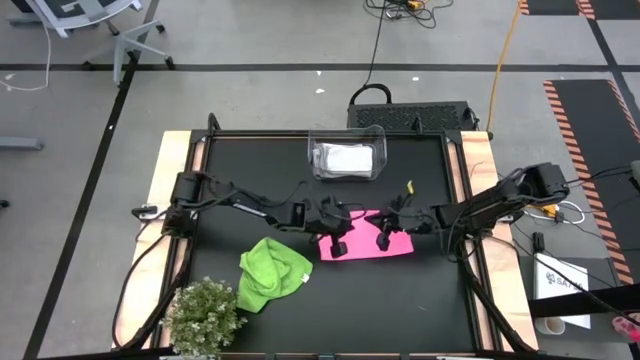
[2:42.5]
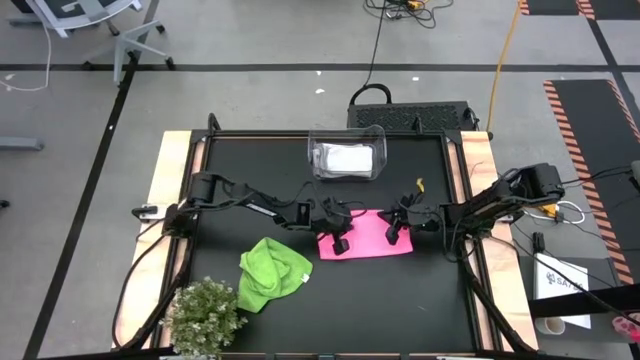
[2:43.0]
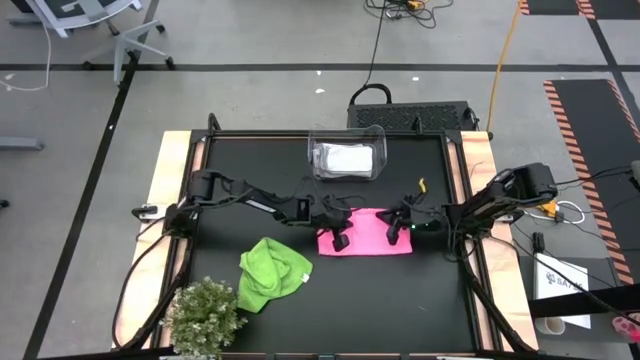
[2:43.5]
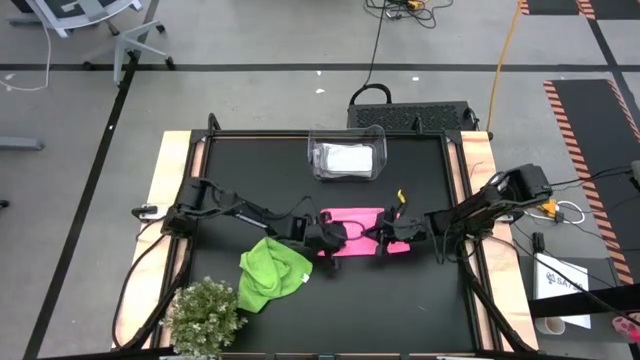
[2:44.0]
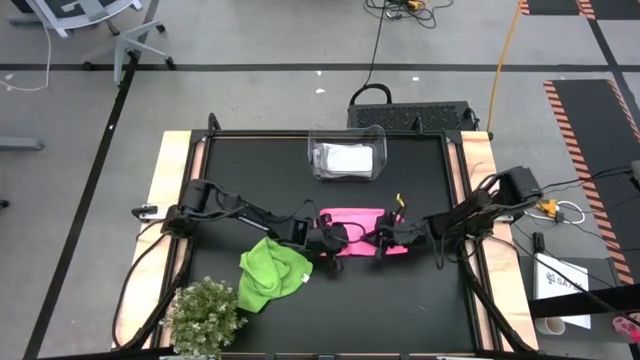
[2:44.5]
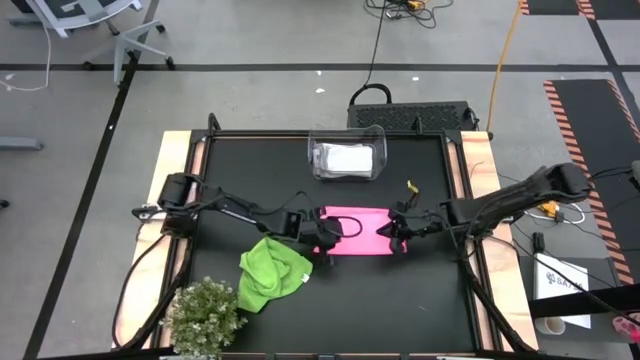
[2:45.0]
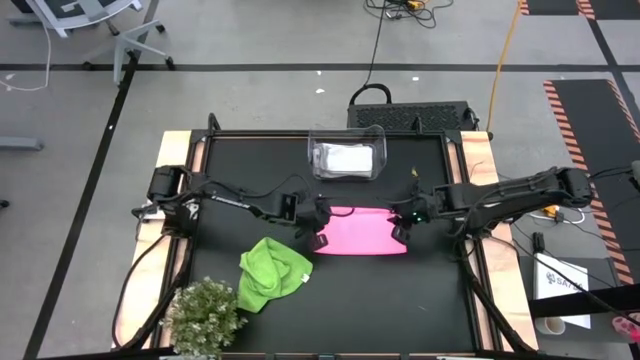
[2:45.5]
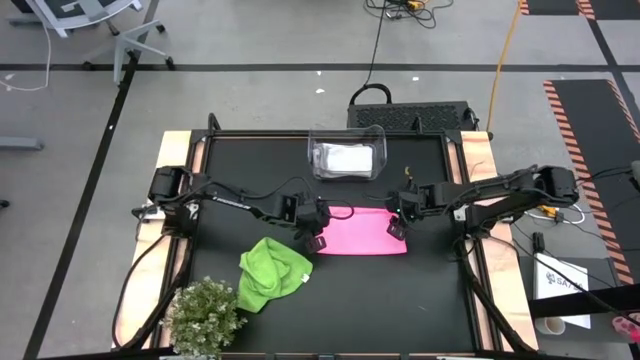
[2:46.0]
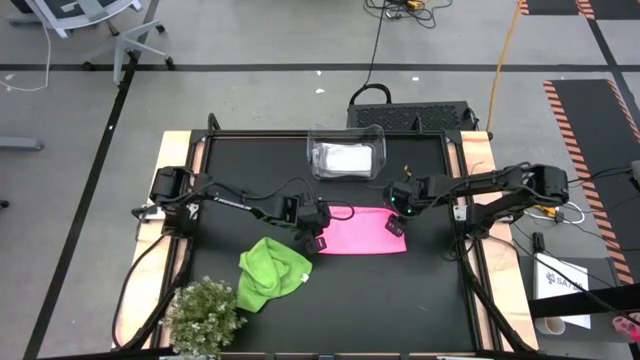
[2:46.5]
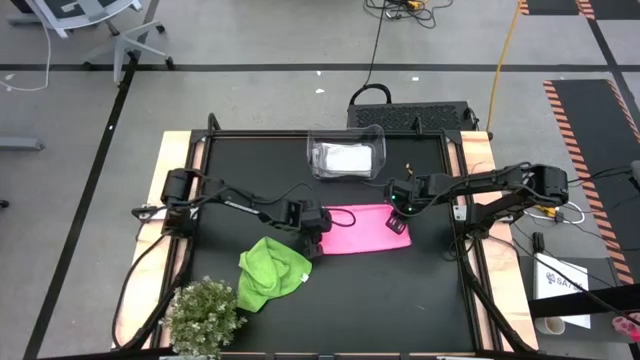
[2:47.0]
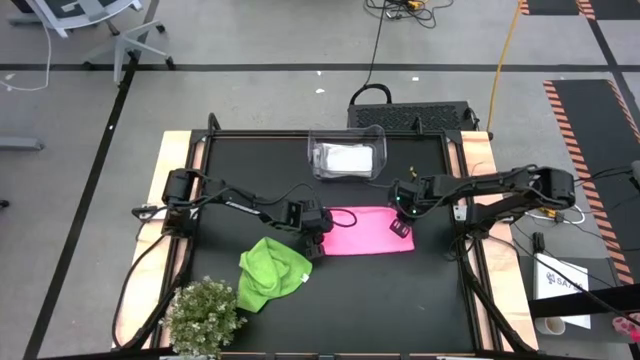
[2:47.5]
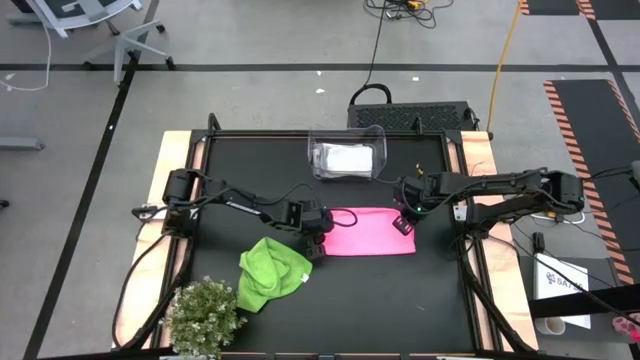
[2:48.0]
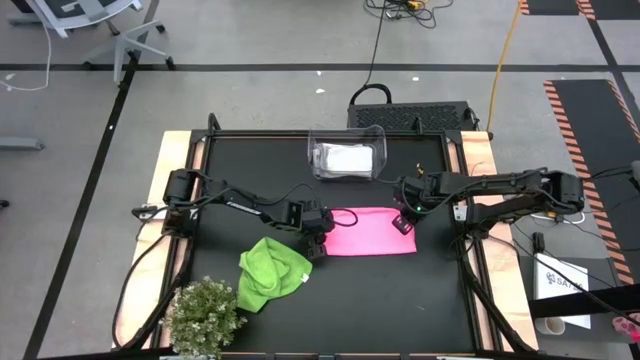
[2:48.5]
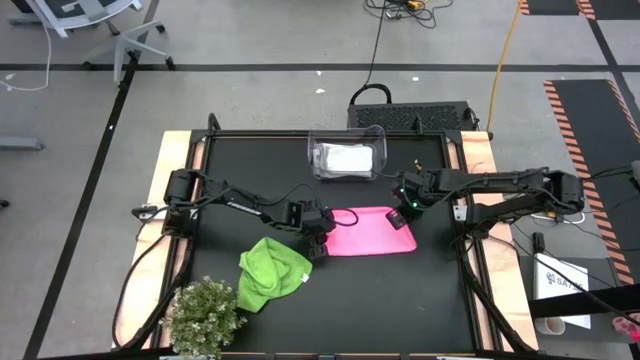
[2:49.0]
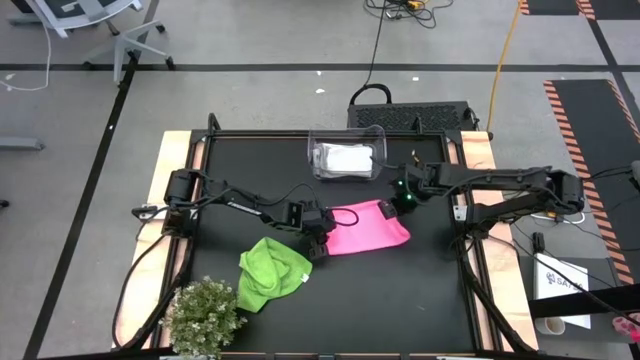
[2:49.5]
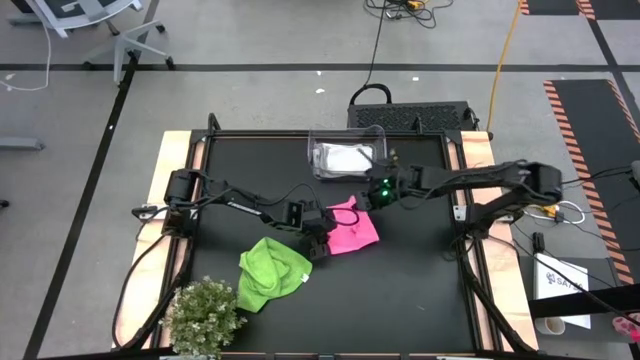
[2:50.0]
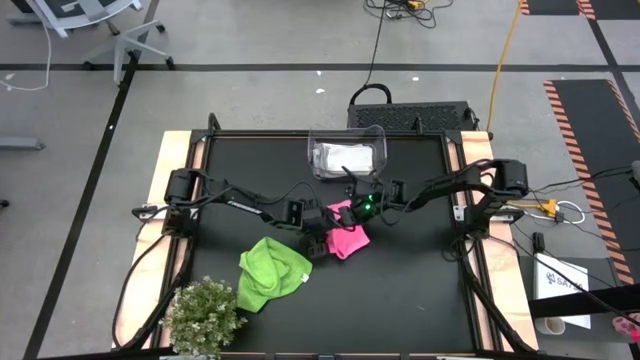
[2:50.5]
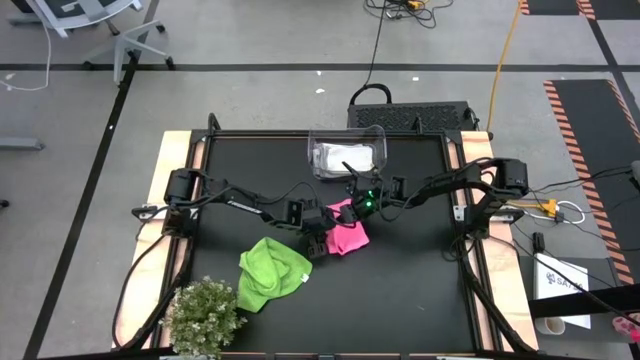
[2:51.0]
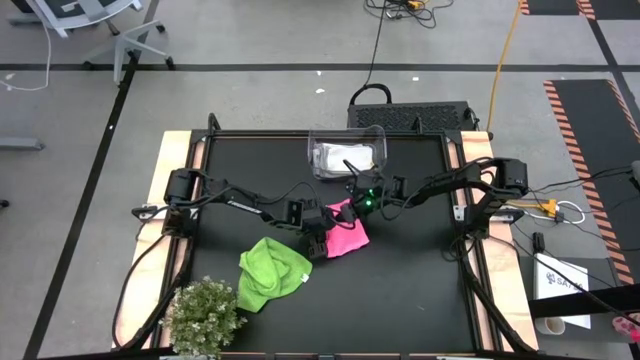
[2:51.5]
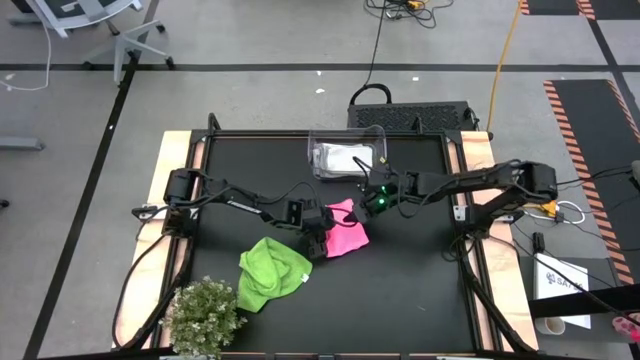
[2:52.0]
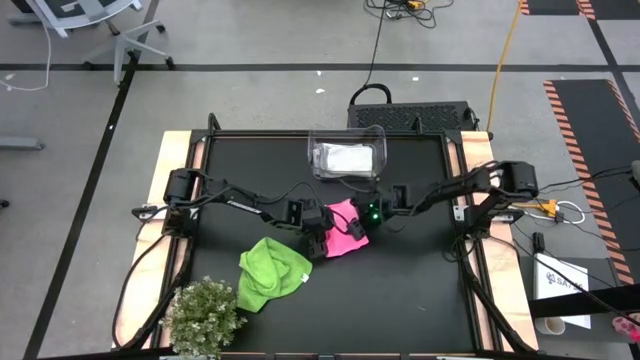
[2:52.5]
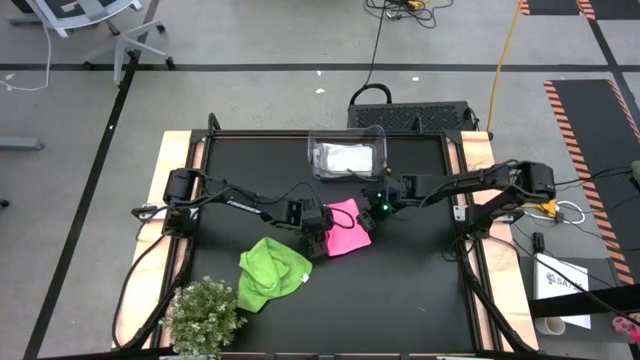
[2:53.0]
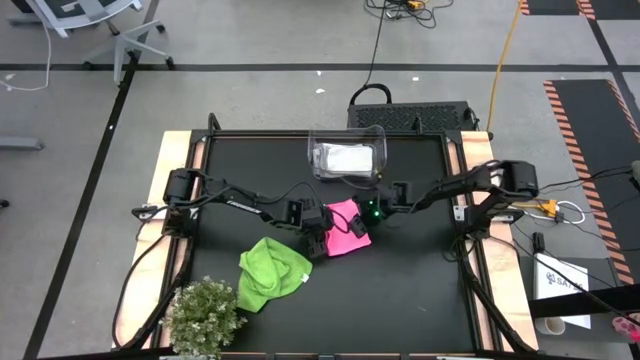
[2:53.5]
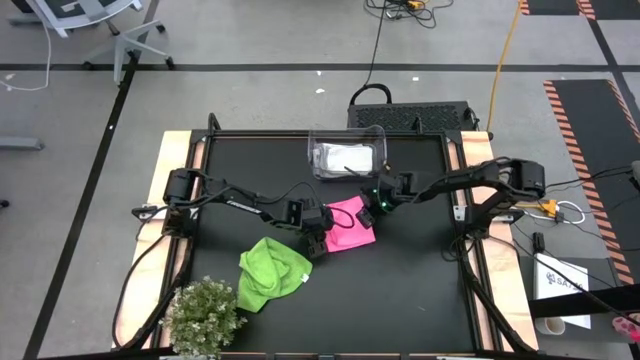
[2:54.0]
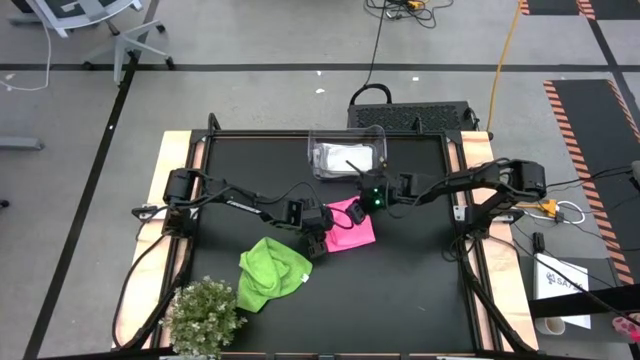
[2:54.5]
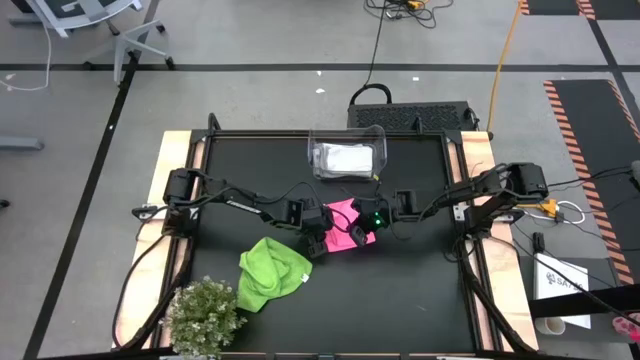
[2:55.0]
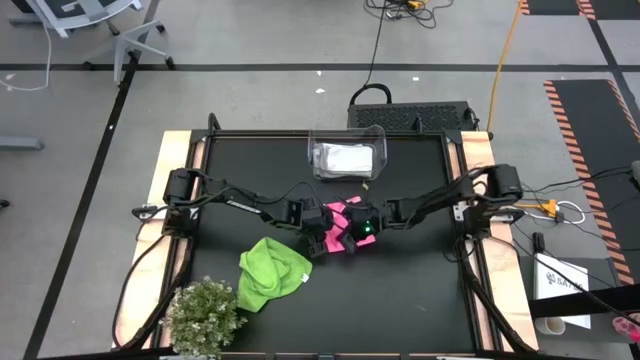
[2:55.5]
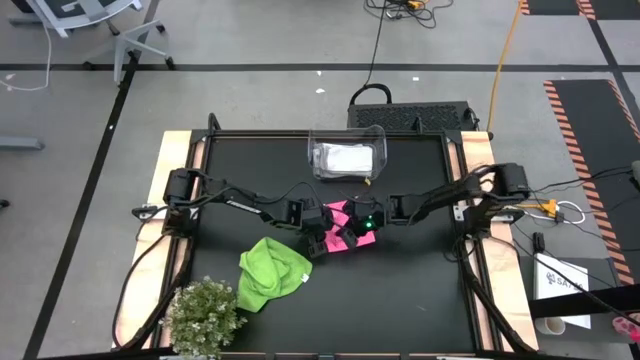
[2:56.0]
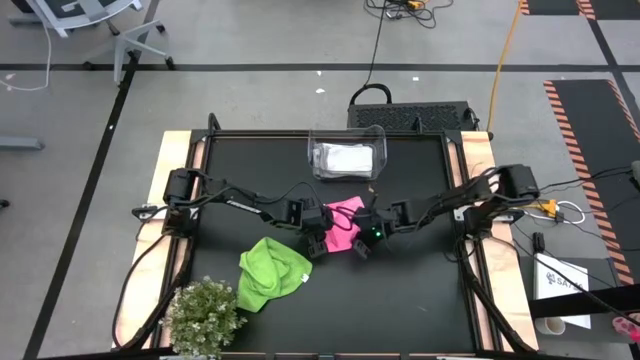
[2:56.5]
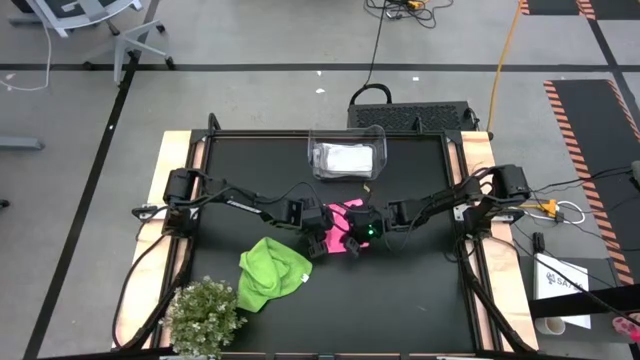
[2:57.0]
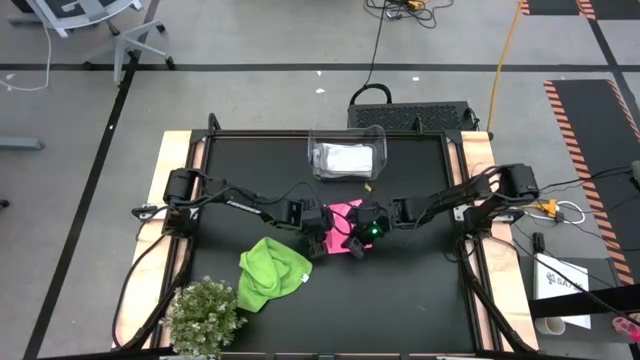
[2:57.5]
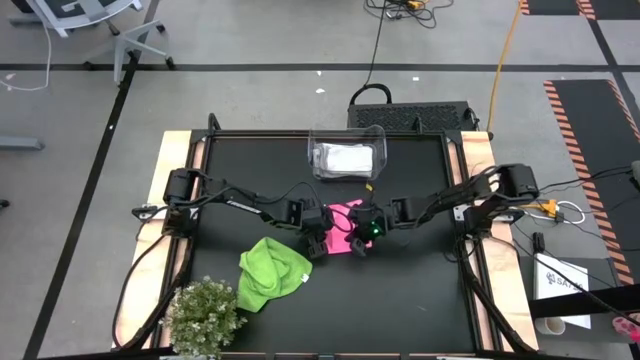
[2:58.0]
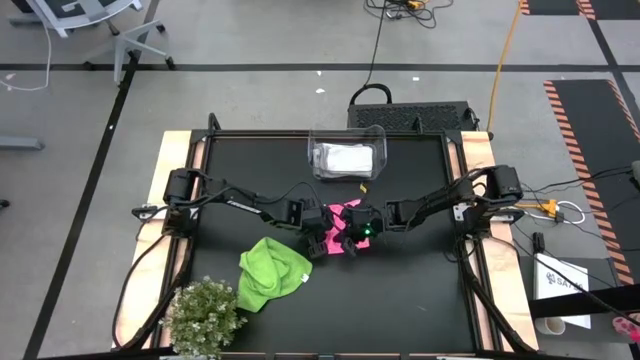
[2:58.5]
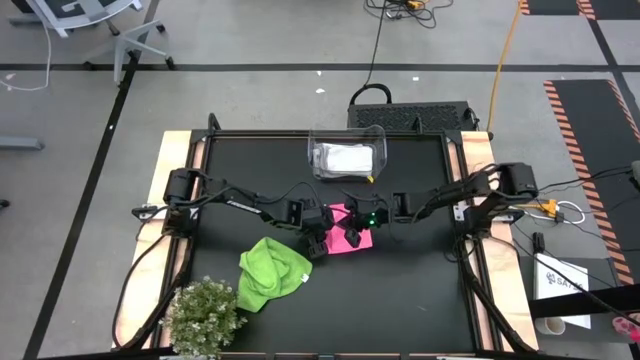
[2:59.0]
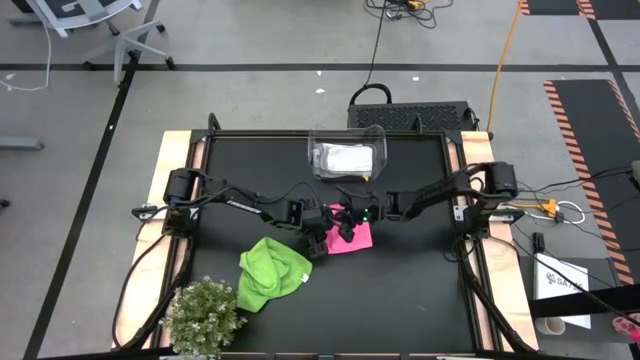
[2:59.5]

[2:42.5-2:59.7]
Task: Fold microfiber towels
Fold the pink microfiber cloth

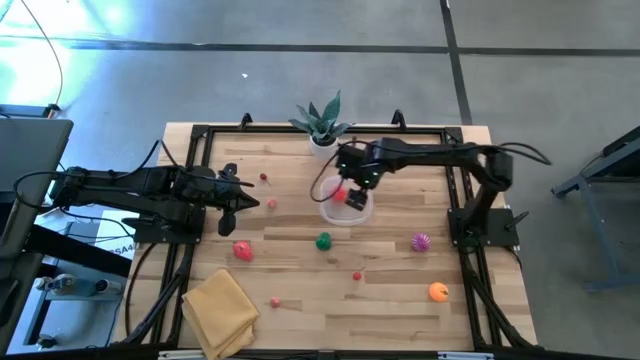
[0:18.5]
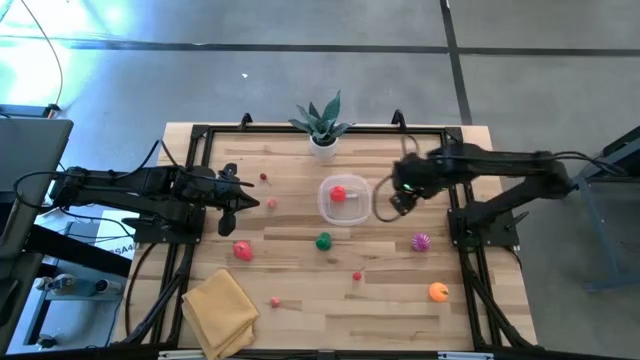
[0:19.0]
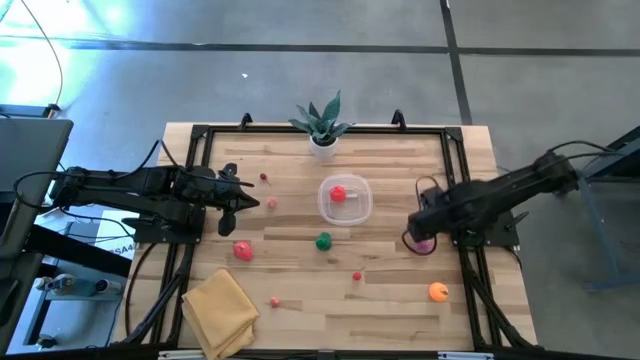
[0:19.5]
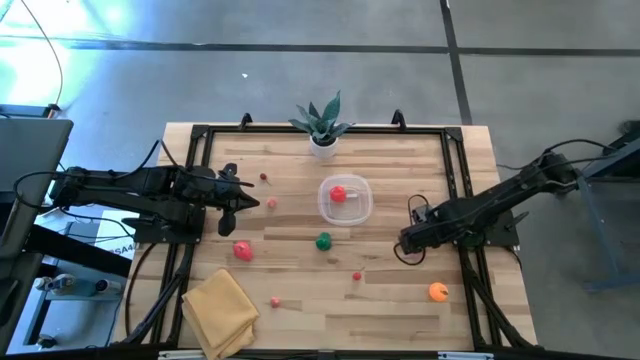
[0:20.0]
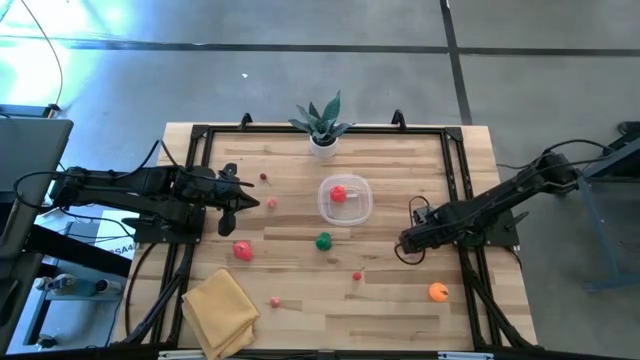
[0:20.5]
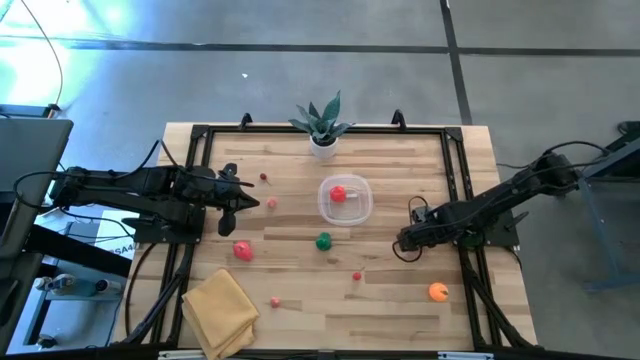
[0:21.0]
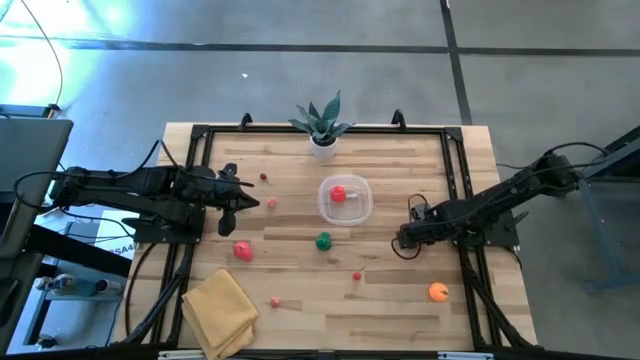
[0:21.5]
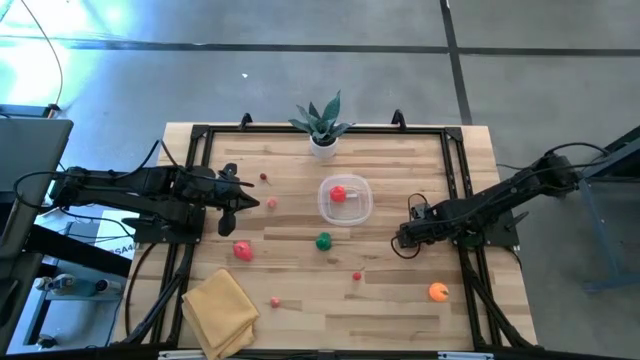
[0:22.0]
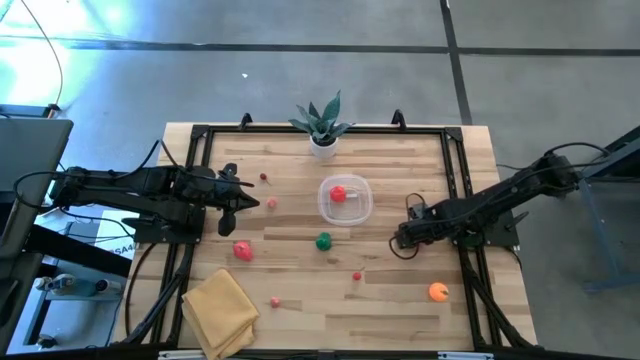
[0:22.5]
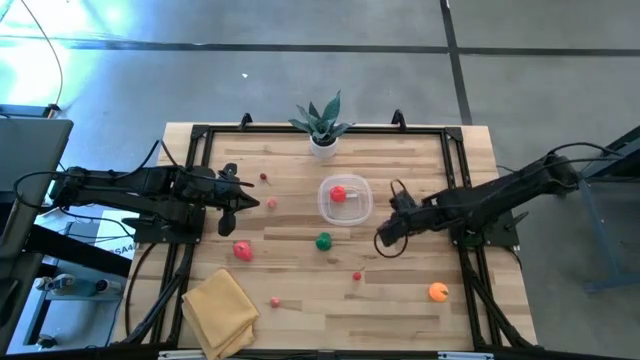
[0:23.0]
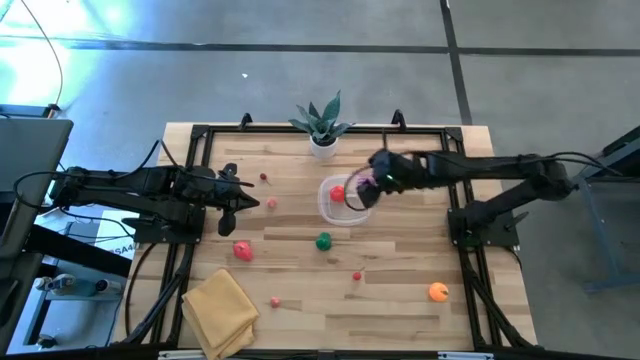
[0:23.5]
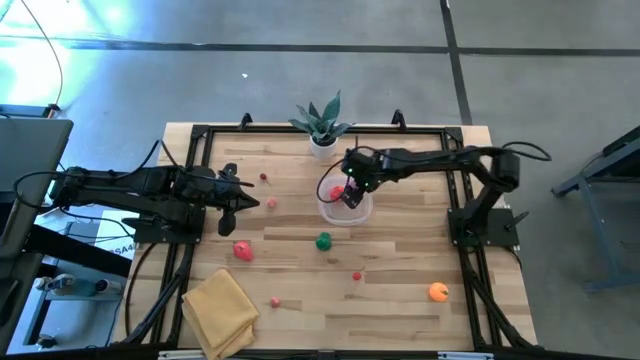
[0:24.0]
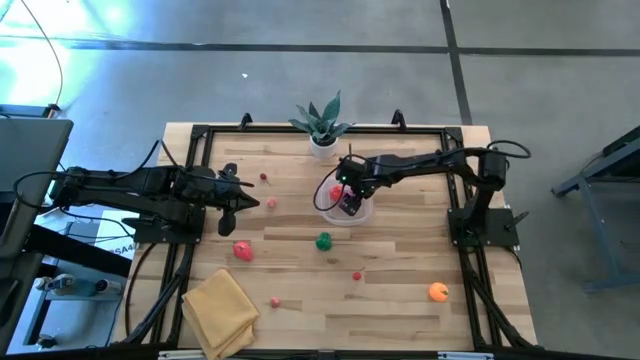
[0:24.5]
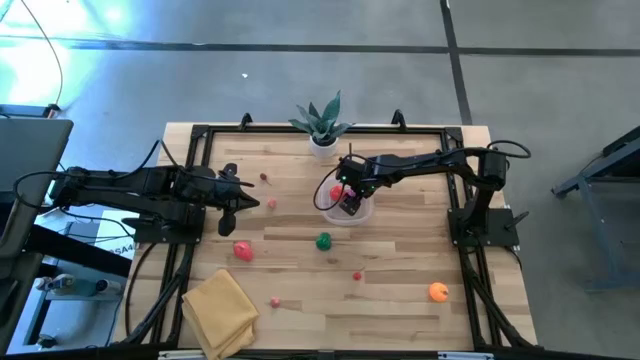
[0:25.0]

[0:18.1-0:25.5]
Task: Pick and placing Produce into tupperware
Put the purple onion into the transparent container
